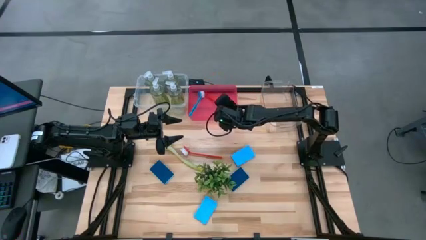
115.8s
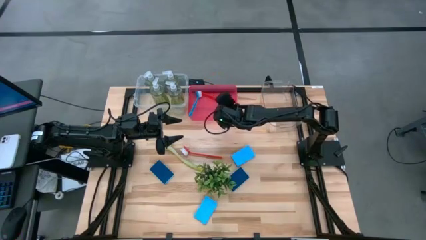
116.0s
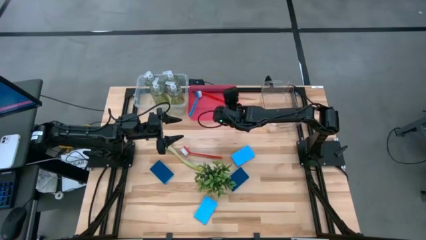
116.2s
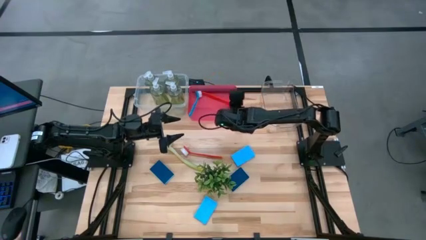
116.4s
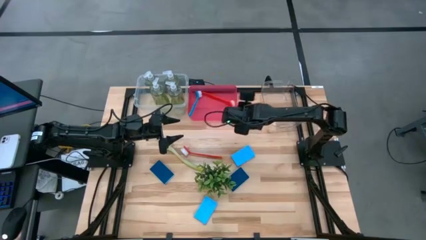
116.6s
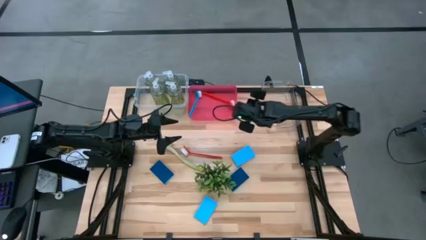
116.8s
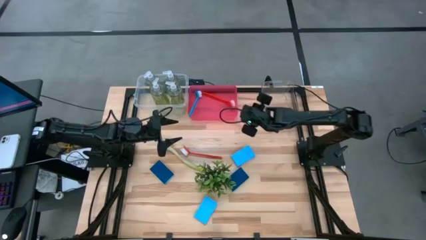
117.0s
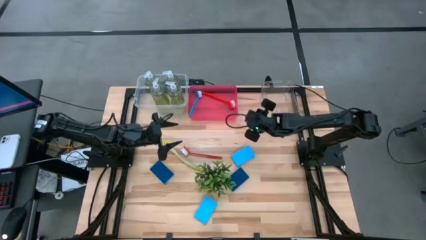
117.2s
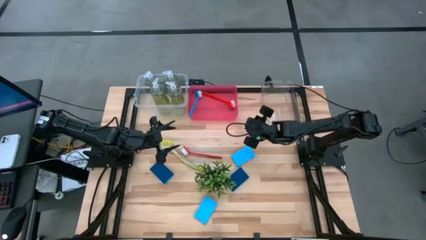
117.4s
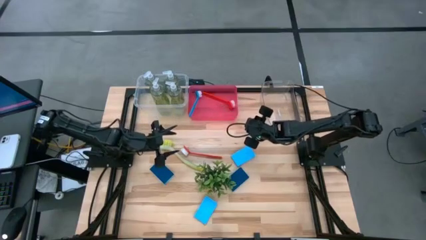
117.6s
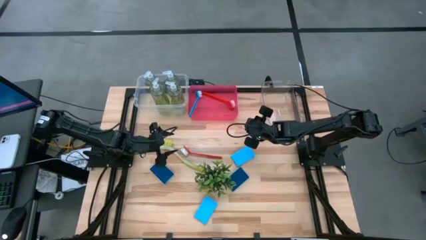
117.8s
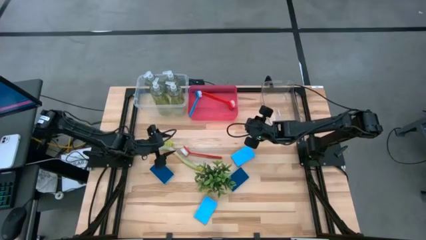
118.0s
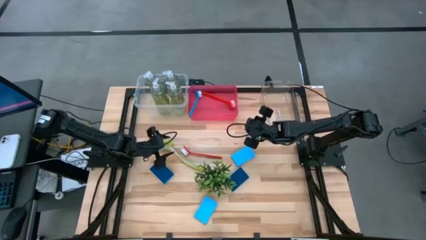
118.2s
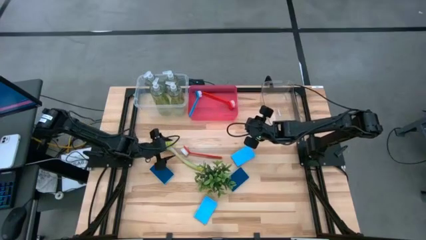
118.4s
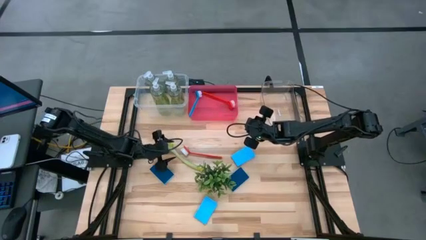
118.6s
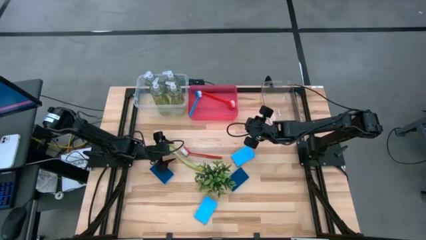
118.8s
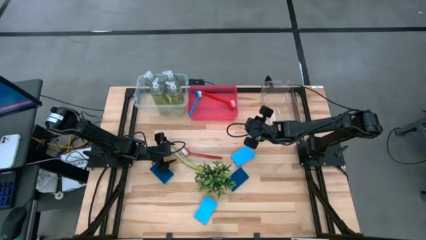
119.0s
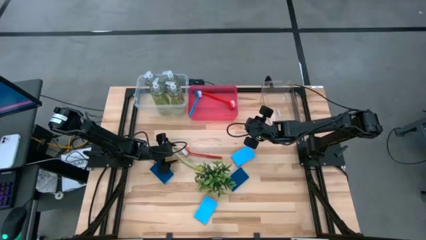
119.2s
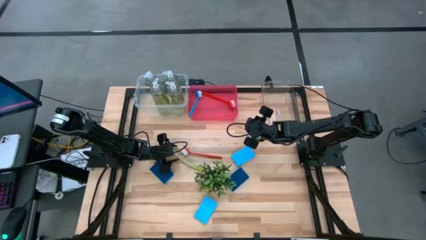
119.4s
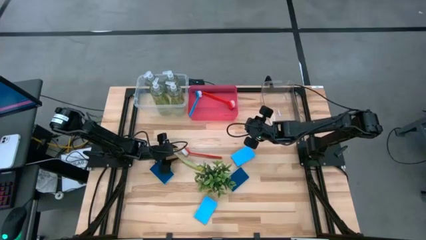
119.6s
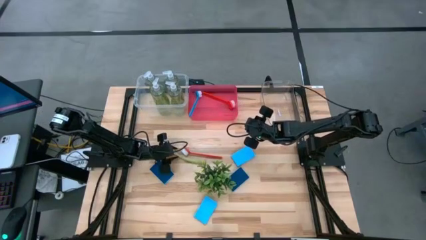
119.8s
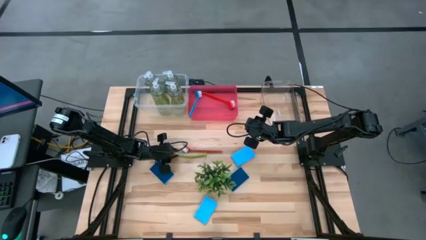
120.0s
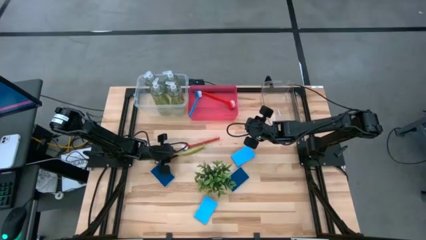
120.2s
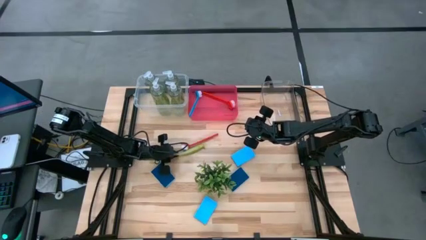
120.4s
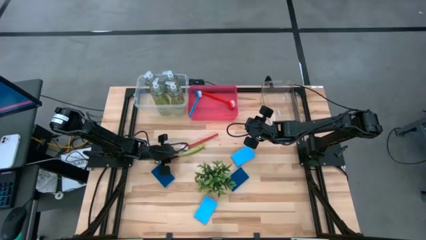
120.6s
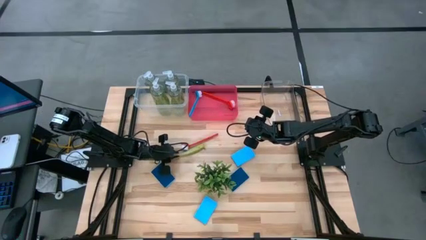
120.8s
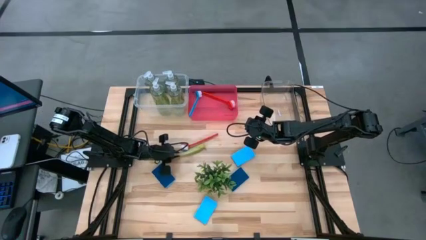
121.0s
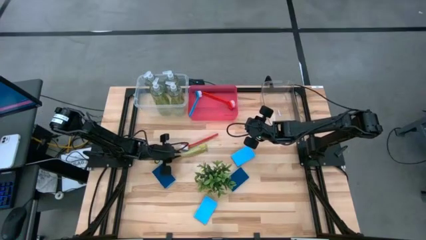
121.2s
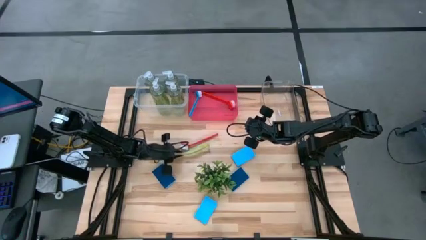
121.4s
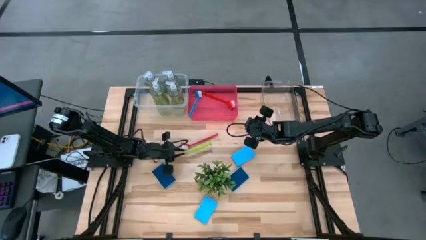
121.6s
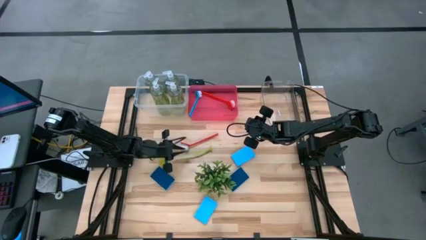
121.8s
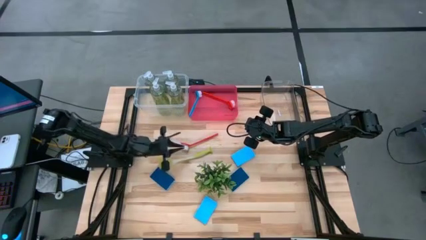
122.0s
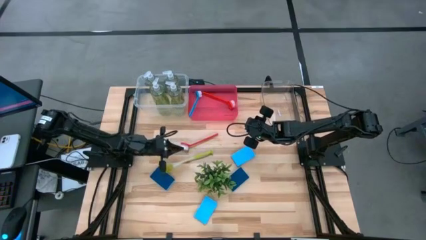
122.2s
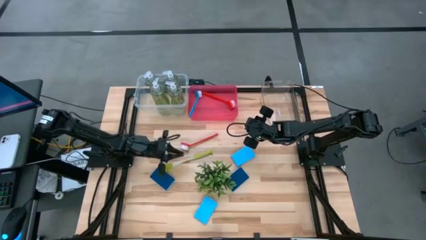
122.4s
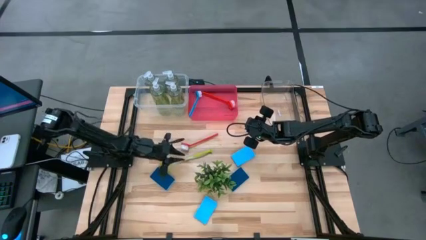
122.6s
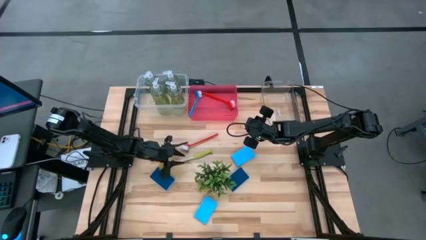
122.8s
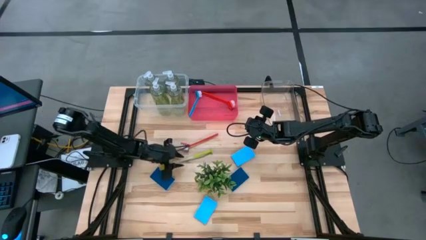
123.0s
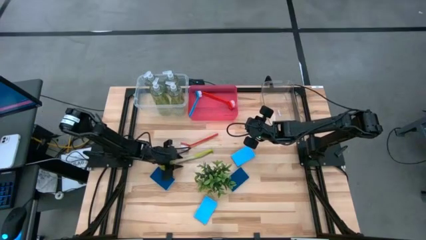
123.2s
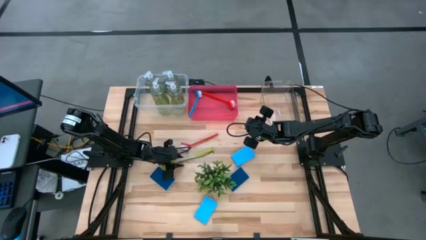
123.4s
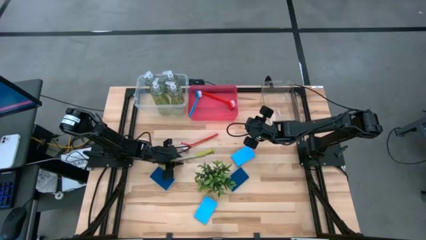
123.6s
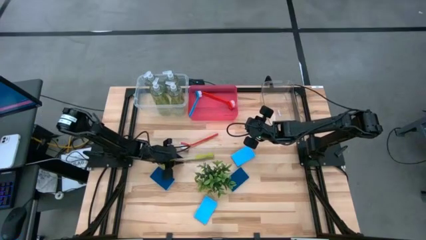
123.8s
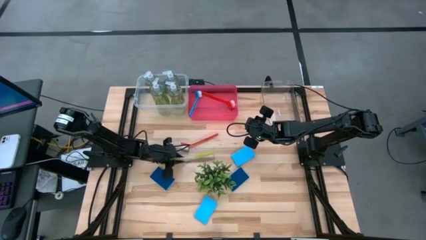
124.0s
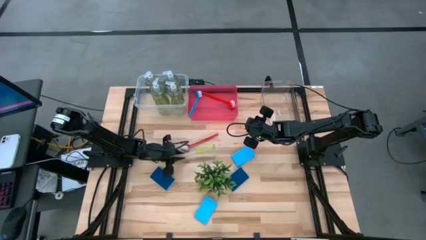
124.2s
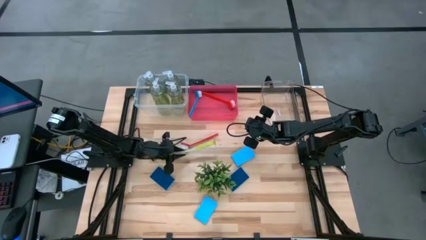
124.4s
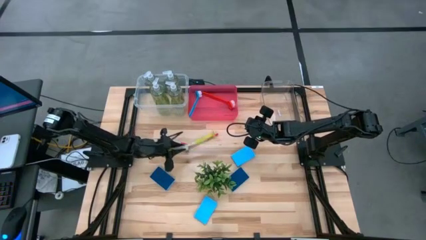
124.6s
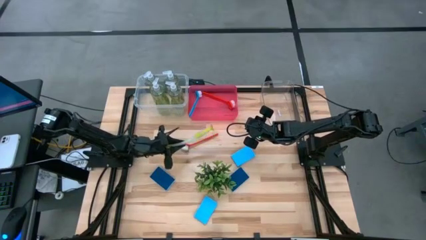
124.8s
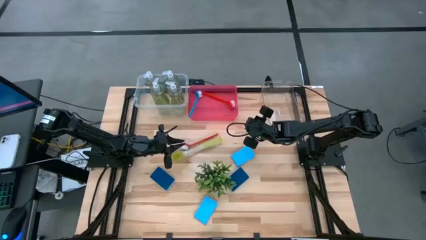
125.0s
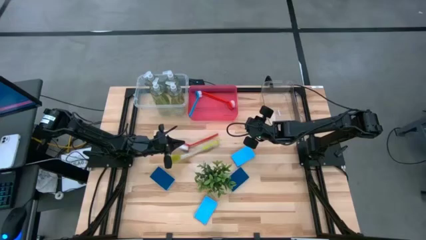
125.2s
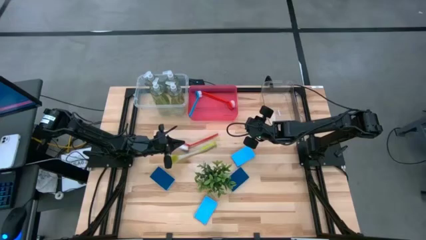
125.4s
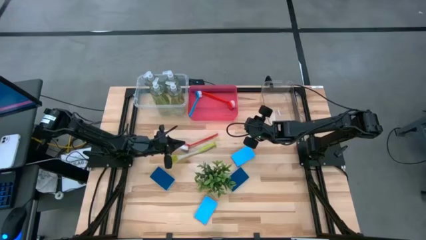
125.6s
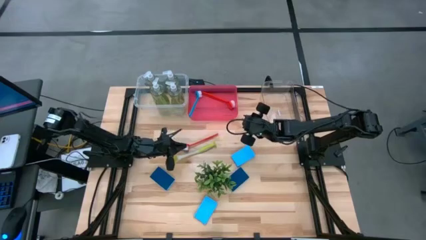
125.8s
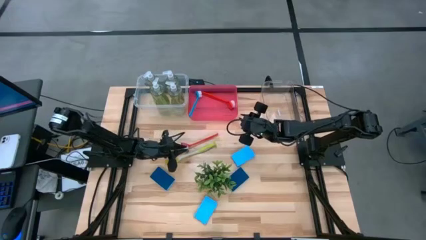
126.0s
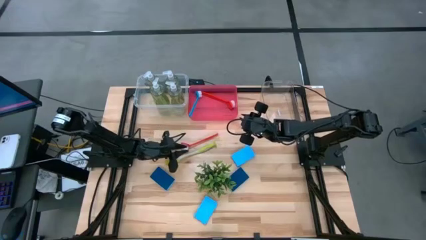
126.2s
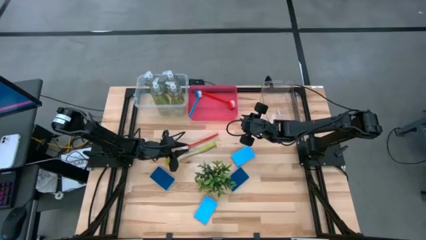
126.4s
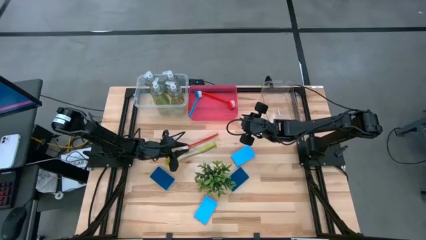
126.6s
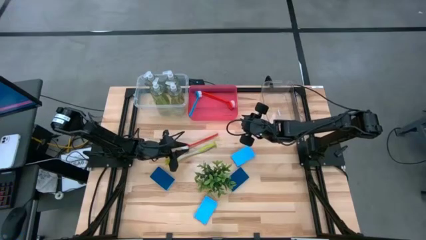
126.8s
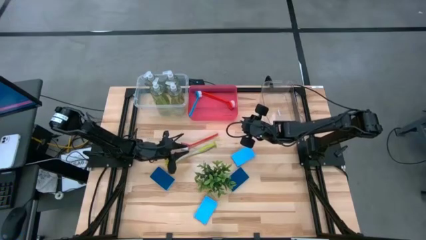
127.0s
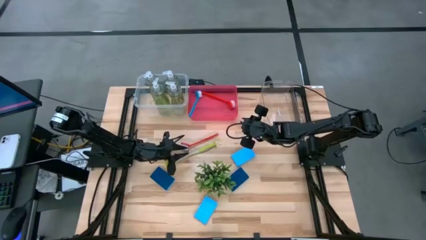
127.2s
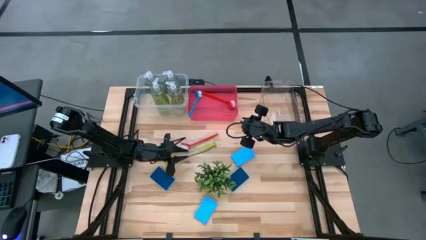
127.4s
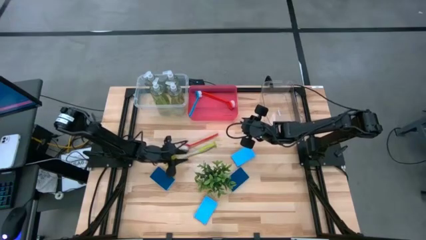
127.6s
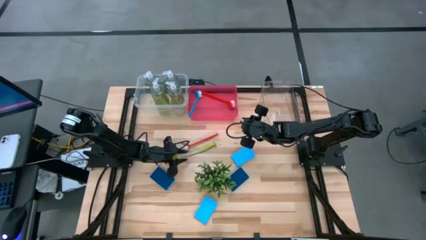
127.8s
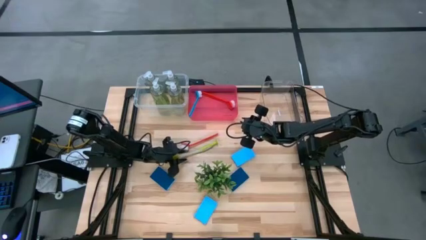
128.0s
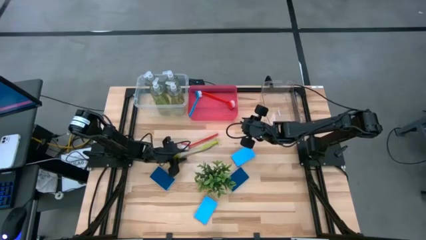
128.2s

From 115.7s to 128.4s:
Task: Pick & Place Kitchen Sink Supplies
Put the yellow dish brush into the red bin

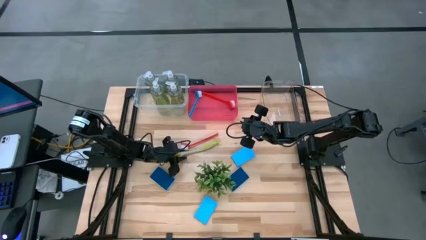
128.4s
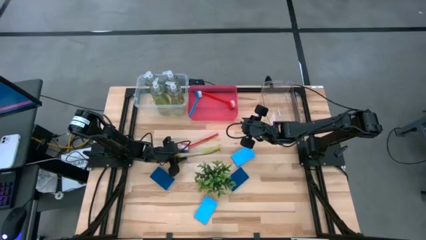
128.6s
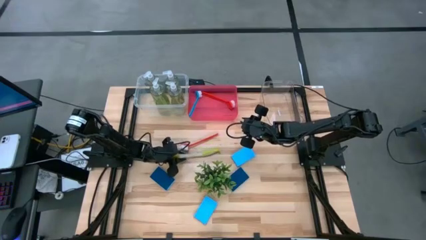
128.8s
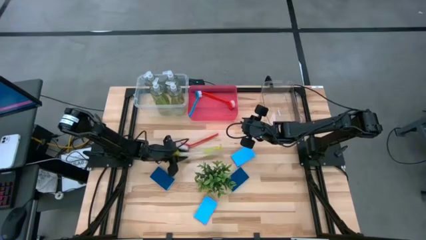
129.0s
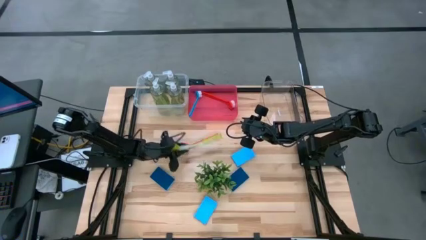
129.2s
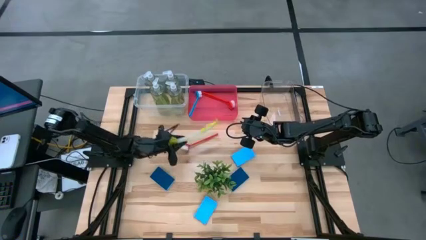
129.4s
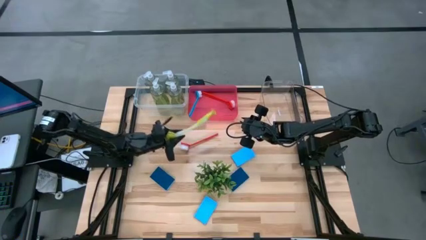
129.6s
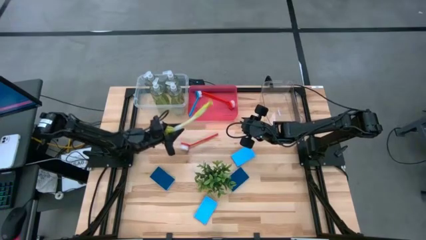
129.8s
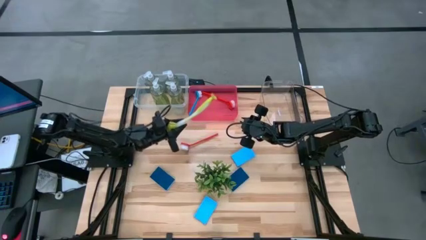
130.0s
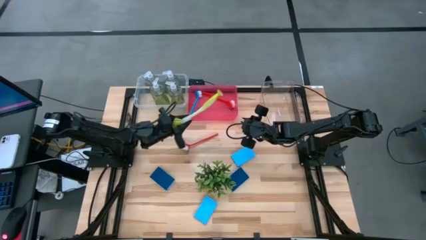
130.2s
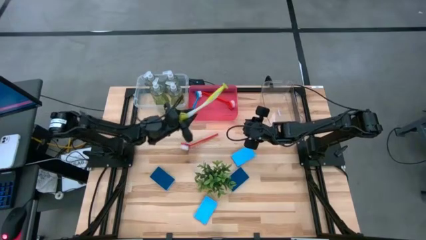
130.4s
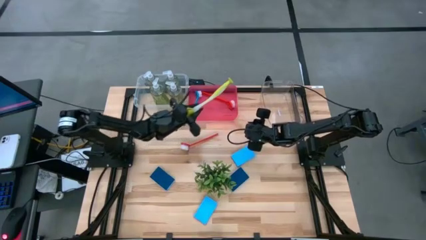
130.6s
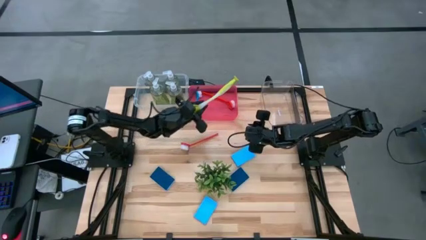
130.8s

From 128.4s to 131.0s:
Put the yellow dish brush into the red bin

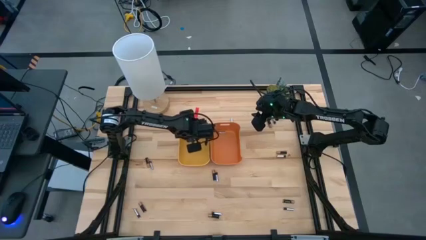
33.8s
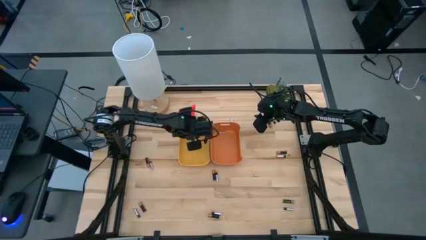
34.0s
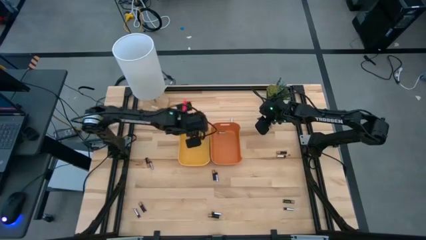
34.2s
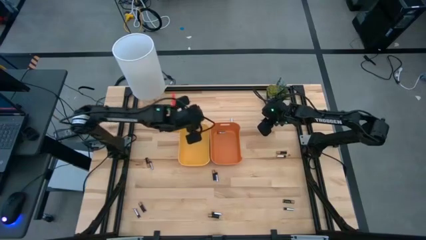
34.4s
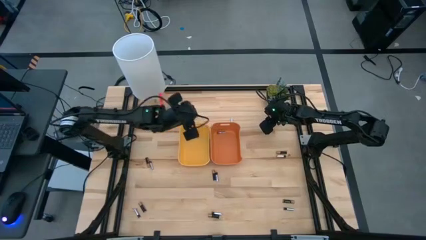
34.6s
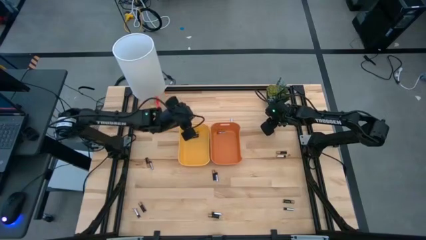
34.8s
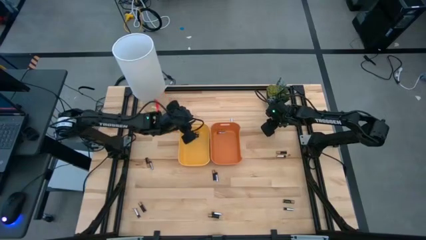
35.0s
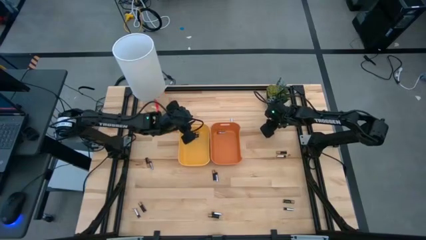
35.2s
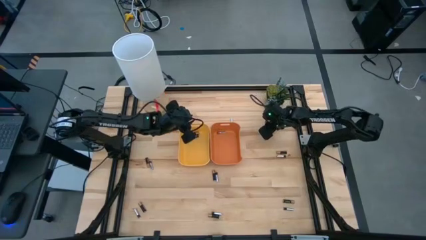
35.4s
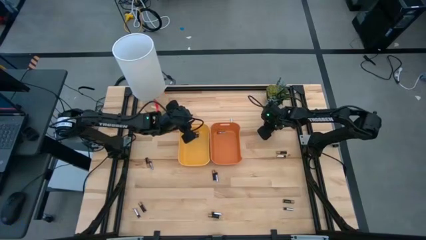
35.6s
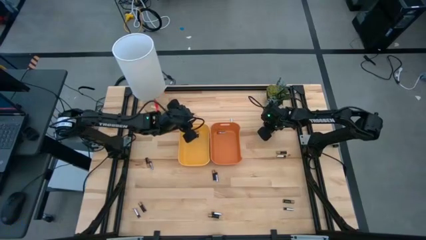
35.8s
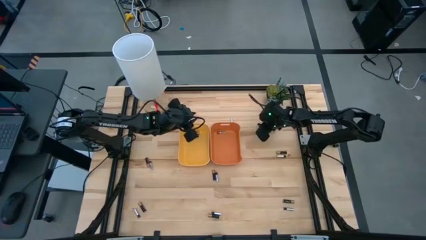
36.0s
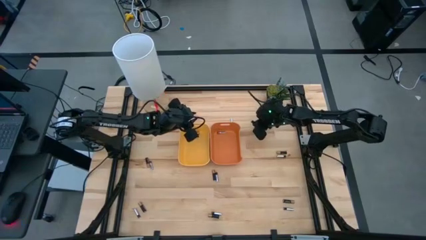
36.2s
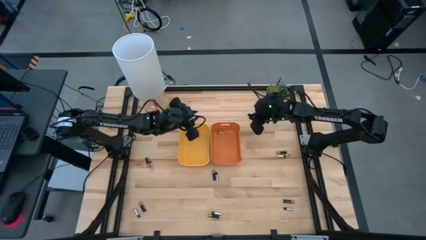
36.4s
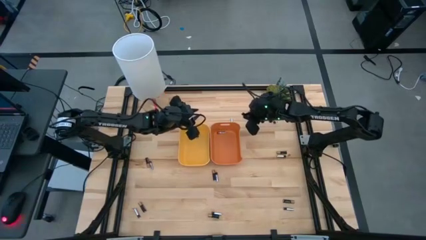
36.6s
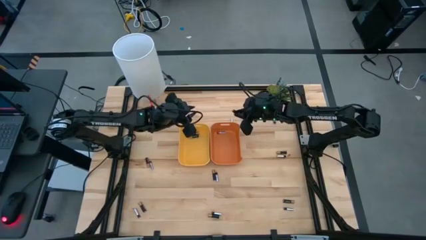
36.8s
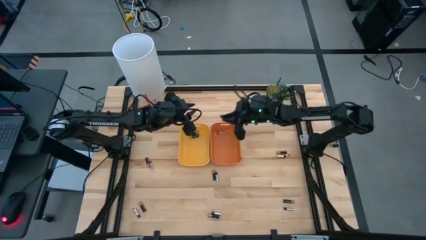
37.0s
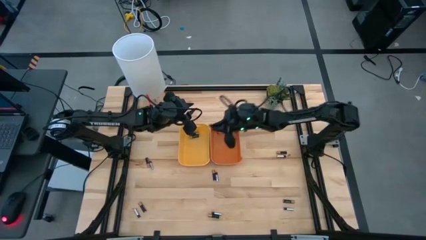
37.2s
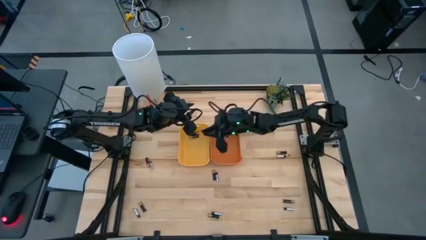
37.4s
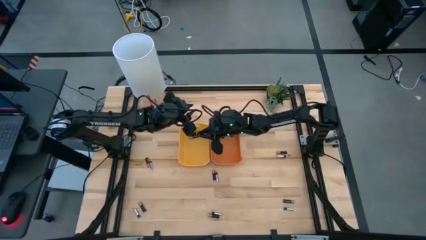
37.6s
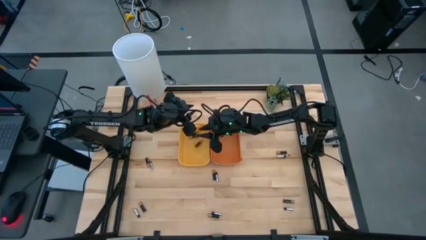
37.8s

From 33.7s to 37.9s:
Task: Sort batteries
Put the top right black battery into the yellow bin
